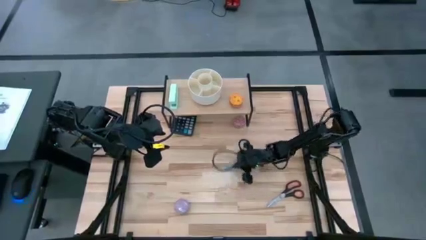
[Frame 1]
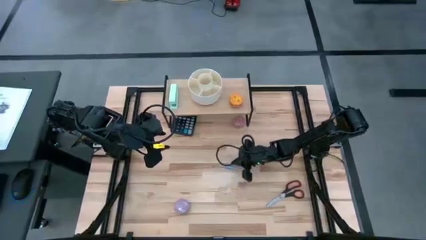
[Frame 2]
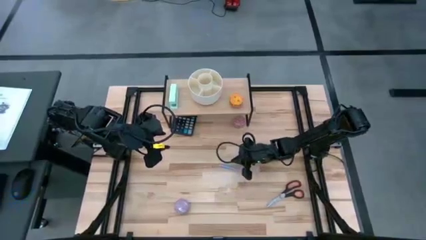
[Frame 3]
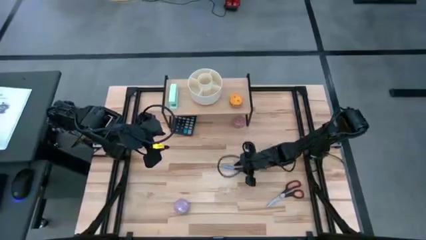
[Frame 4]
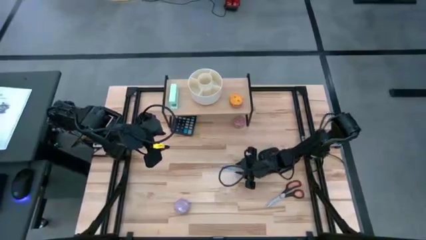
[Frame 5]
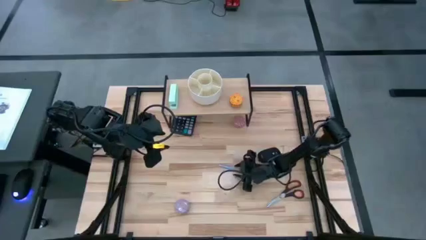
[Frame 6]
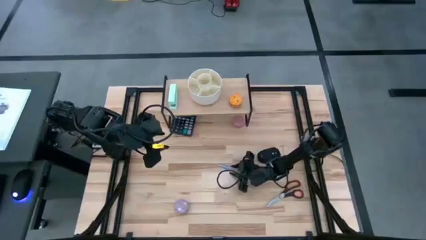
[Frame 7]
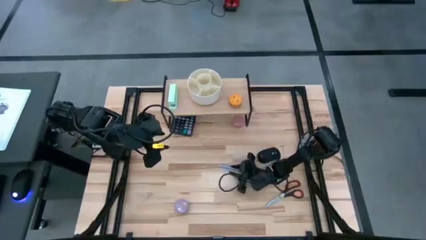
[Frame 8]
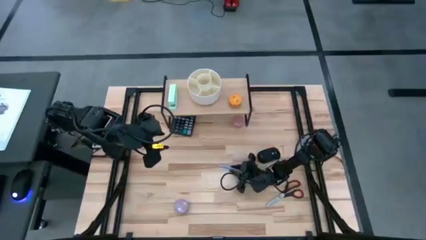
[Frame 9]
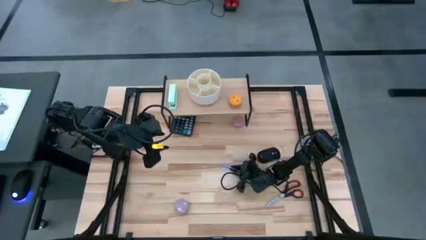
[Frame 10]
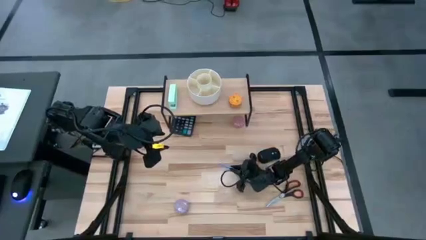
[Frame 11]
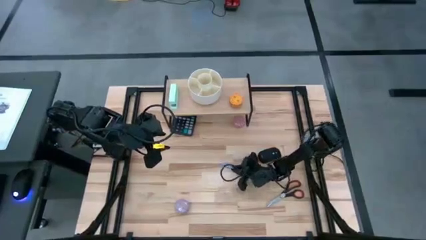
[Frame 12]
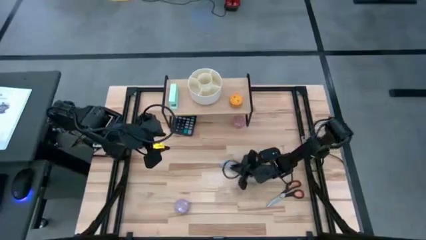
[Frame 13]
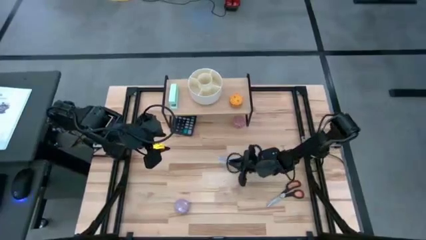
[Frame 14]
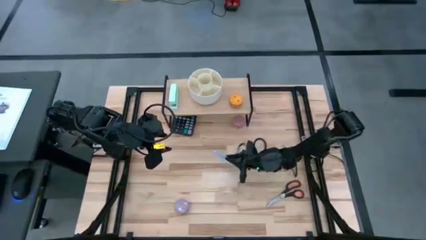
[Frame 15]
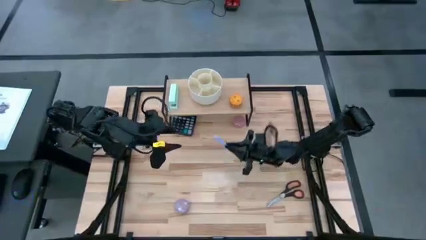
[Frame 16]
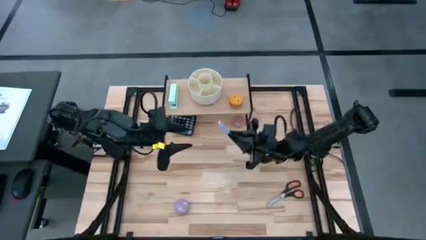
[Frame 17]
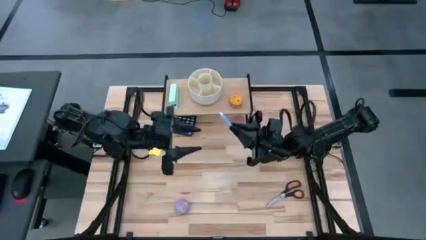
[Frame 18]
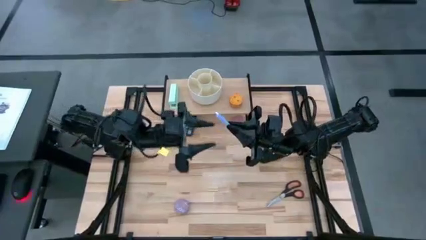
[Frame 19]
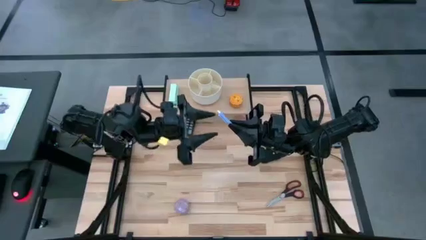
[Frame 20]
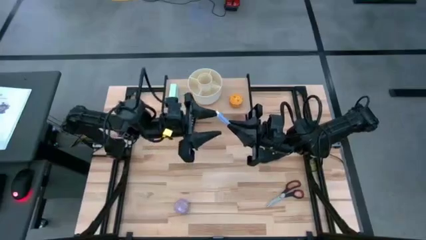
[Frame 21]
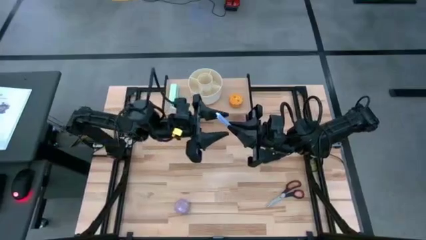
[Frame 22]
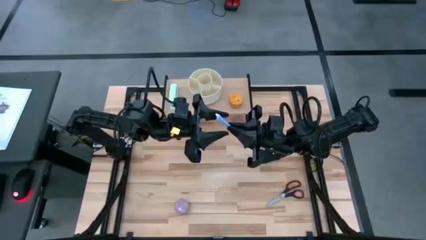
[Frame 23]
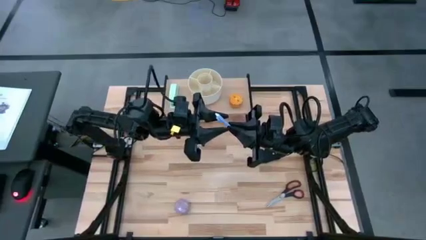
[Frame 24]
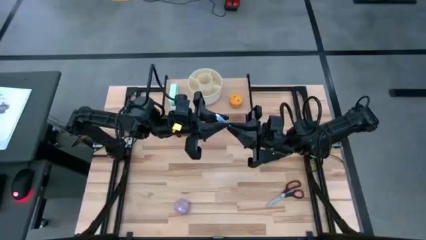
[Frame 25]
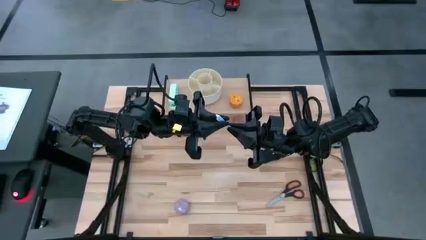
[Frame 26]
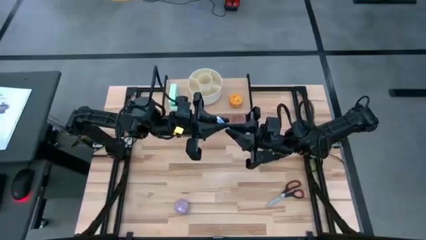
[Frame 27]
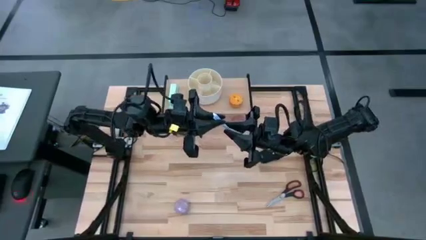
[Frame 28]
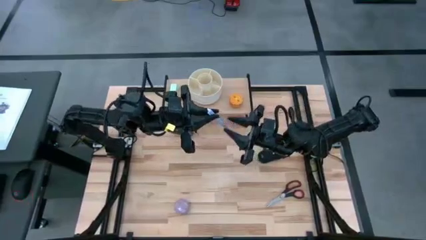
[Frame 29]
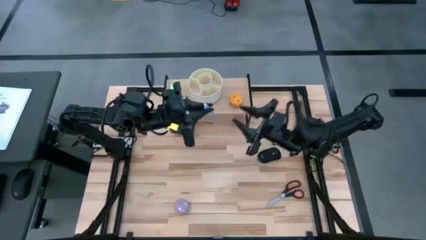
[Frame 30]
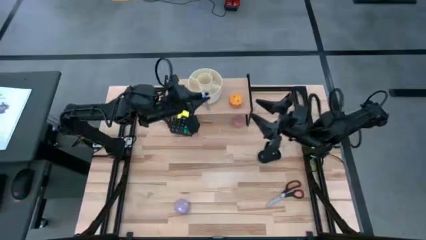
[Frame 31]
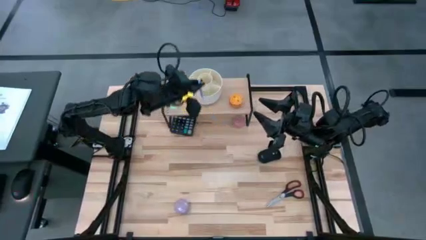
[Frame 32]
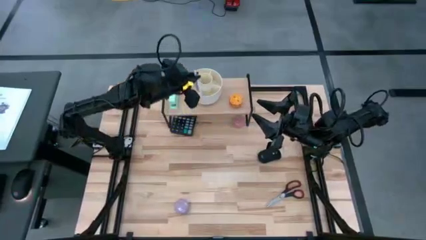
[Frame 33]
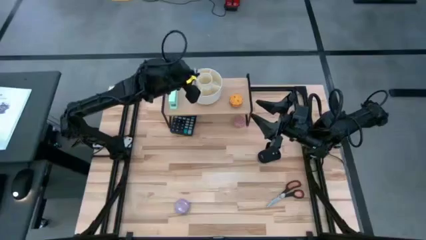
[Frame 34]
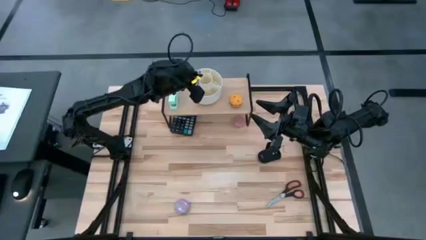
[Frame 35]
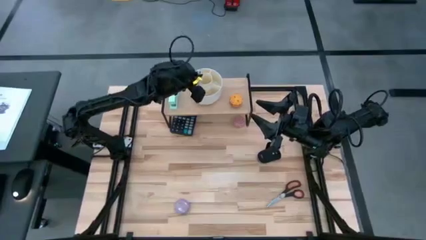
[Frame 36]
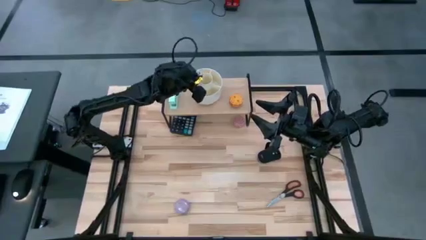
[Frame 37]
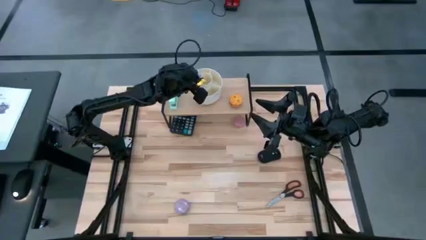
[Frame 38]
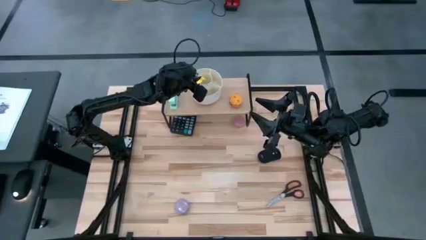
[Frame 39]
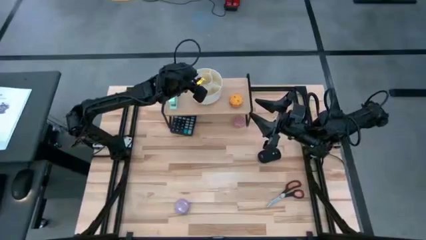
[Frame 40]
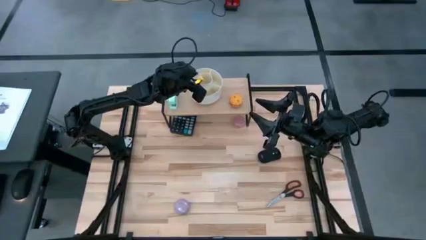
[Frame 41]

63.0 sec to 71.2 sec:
Task: Stock shelves
Put the gray pen into the white desk organizer

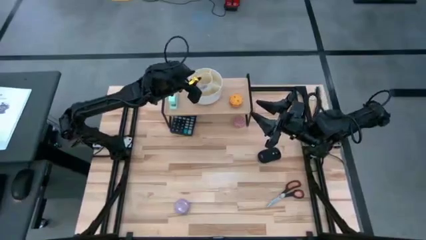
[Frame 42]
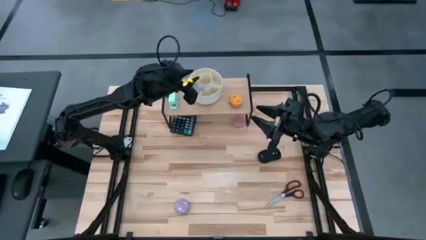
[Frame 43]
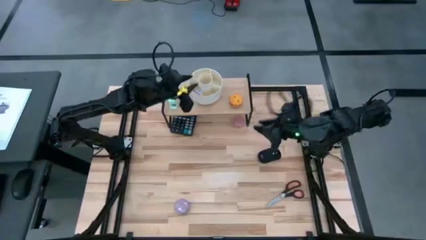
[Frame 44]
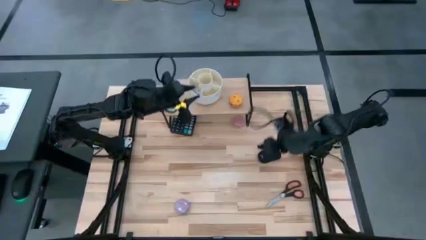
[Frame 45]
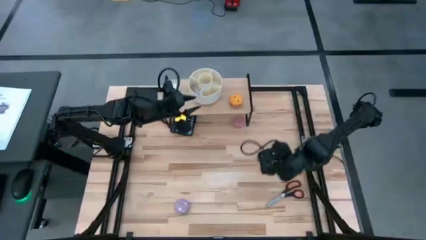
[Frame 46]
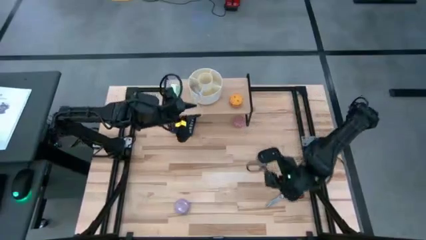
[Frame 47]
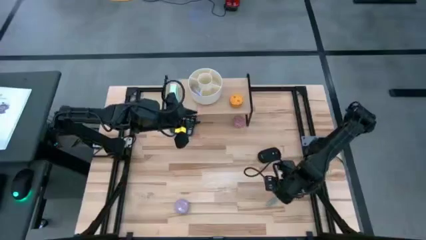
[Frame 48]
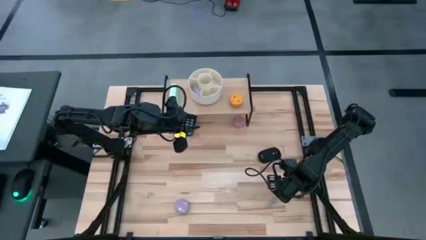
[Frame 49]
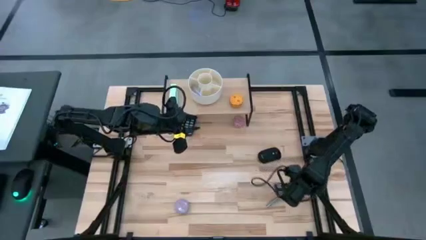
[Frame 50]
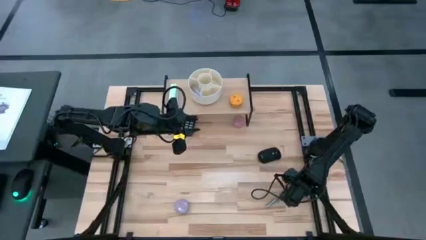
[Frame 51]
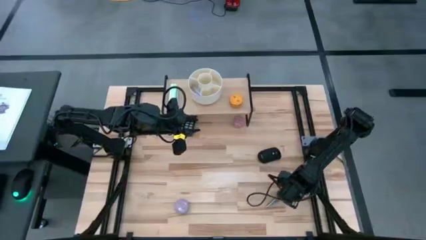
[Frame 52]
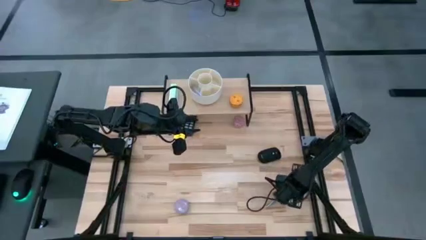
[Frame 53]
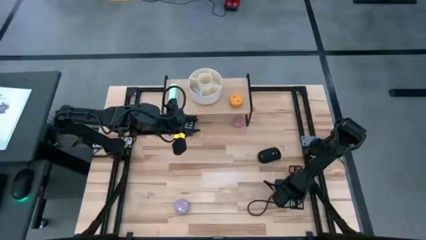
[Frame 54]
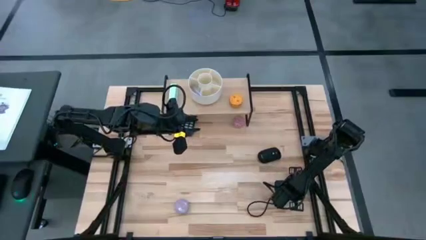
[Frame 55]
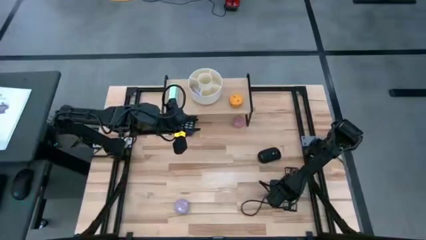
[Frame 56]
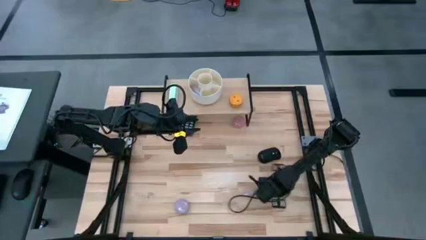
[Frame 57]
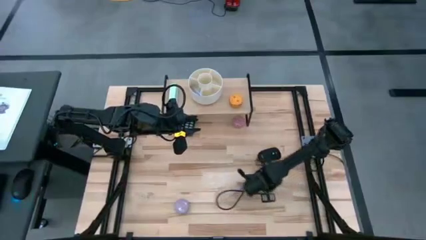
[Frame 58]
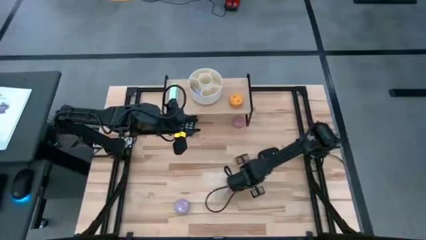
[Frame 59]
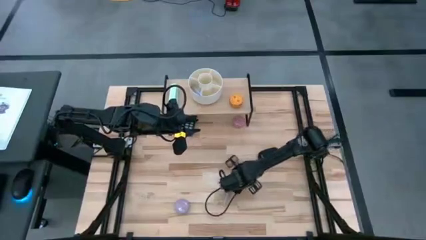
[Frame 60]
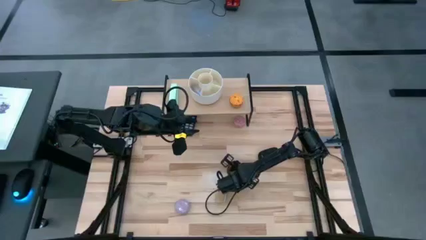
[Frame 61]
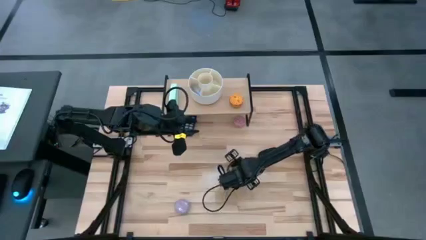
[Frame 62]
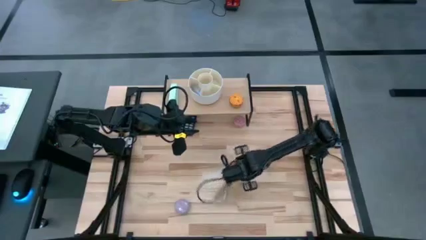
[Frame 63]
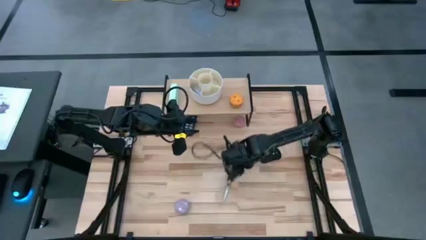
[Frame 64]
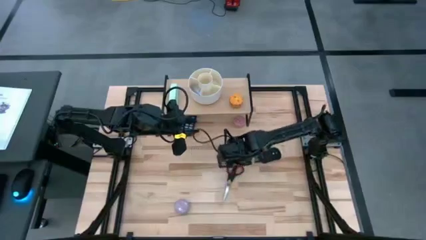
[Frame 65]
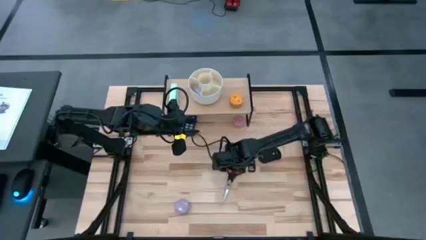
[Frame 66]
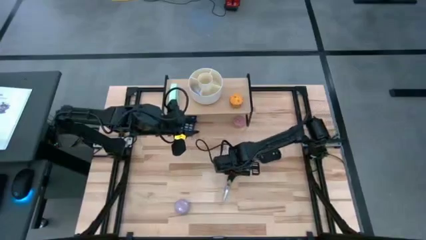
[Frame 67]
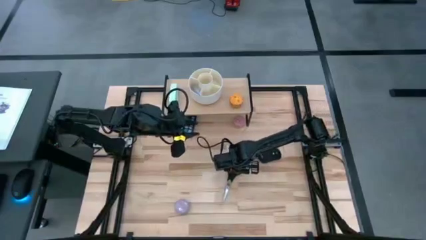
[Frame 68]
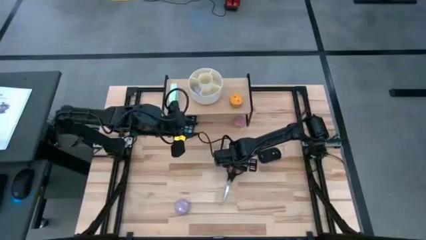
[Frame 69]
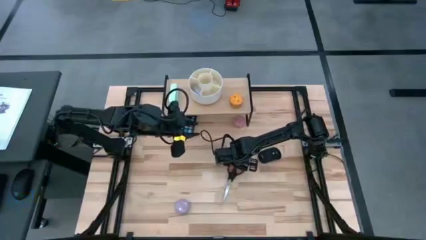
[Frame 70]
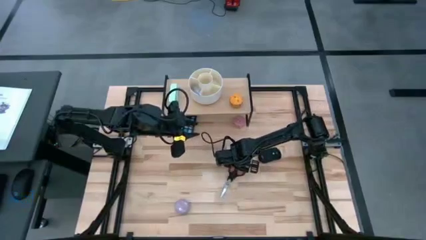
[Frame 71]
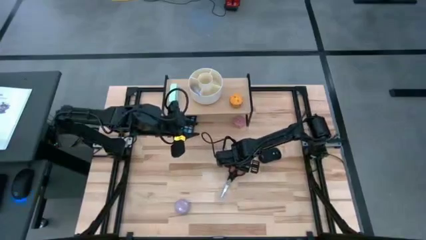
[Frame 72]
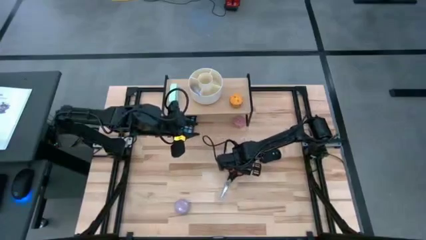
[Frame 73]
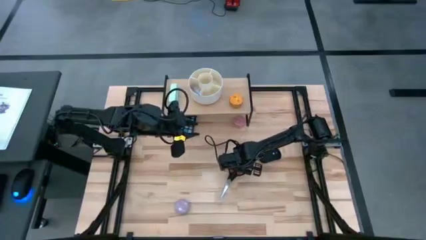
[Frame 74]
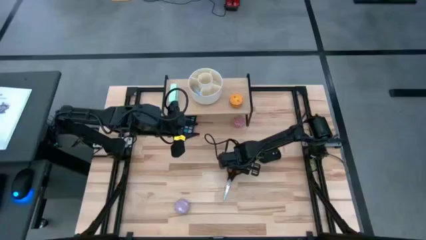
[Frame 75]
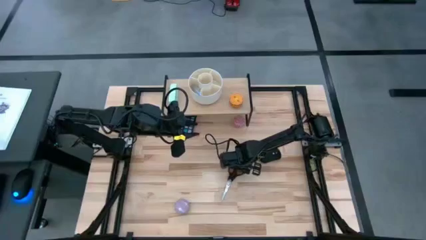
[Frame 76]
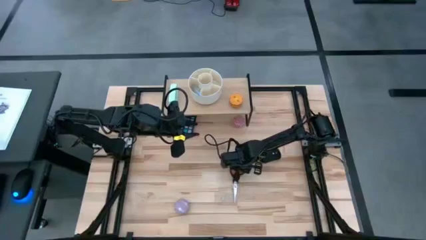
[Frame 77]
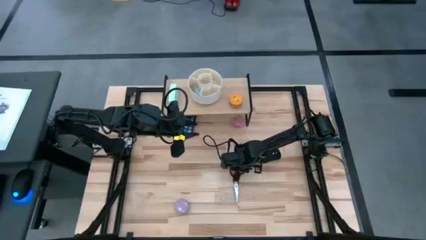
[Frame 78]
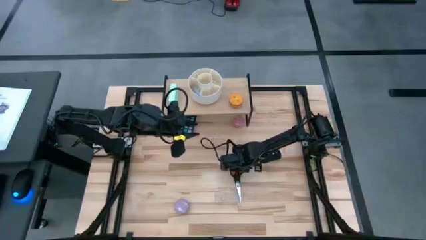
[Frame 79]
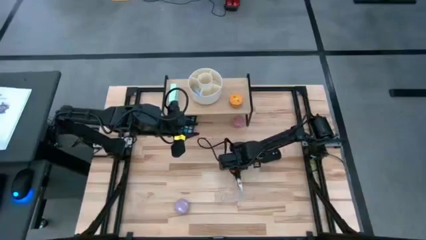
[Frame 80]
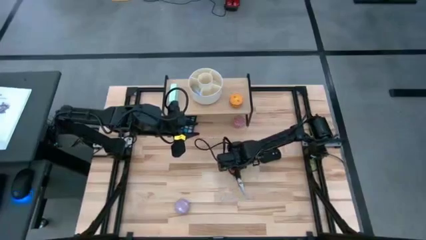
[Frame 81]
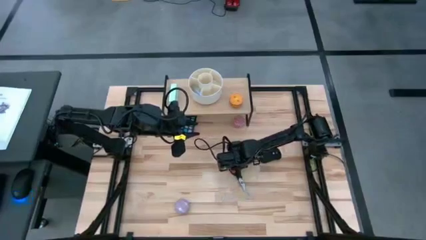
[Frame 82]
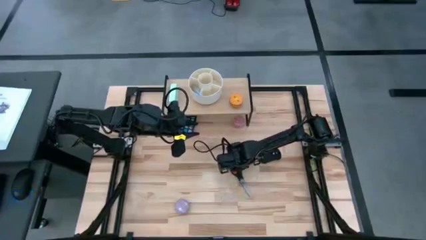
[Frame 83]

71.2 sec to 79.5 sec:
Put the black scissor into the white desk organizer
